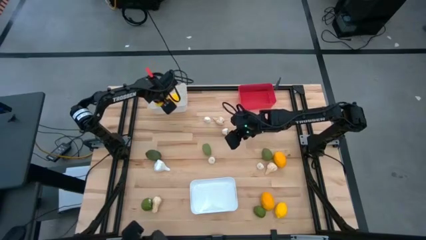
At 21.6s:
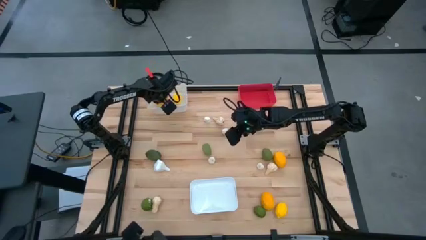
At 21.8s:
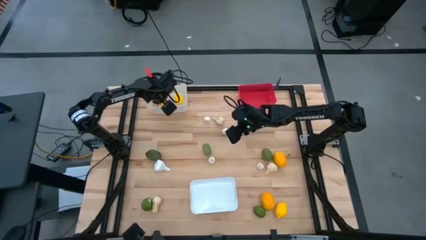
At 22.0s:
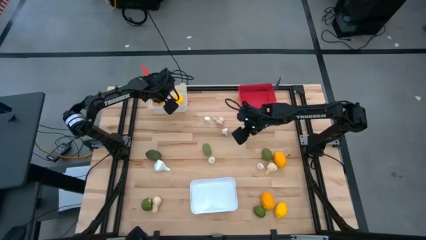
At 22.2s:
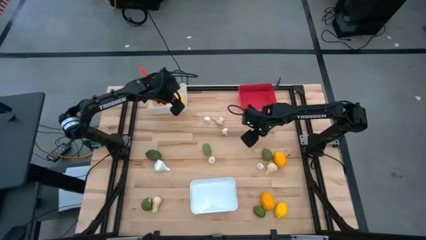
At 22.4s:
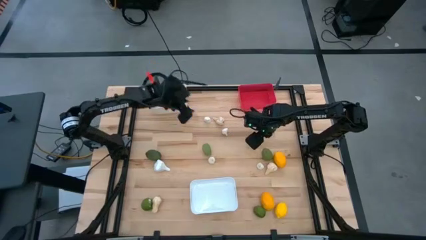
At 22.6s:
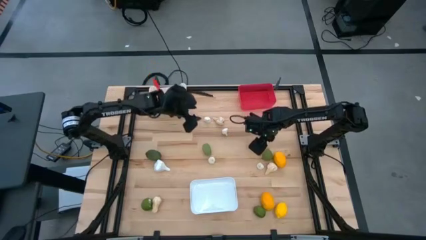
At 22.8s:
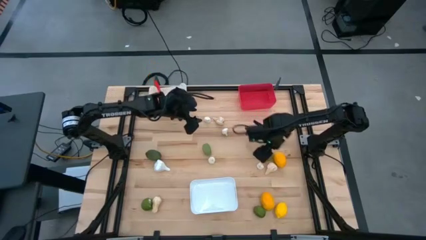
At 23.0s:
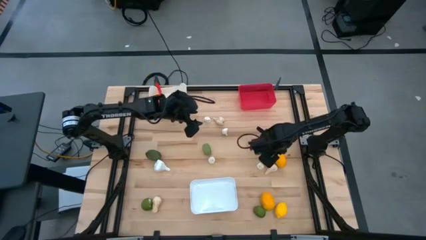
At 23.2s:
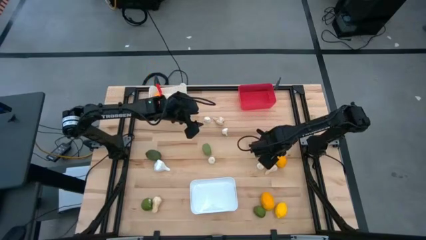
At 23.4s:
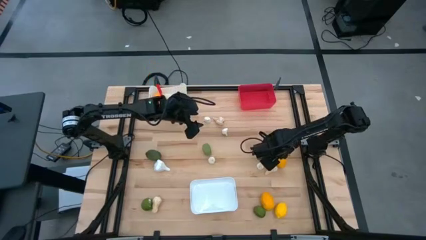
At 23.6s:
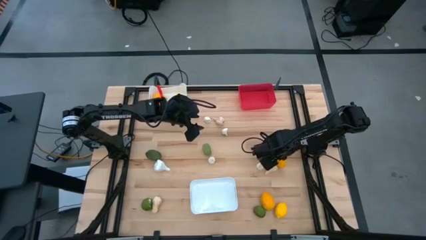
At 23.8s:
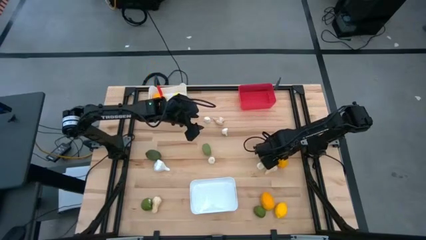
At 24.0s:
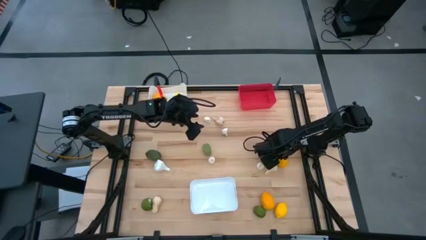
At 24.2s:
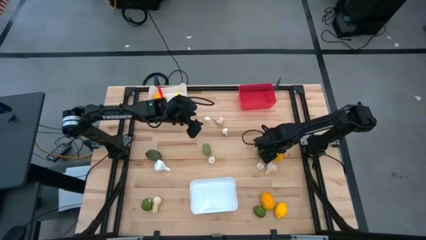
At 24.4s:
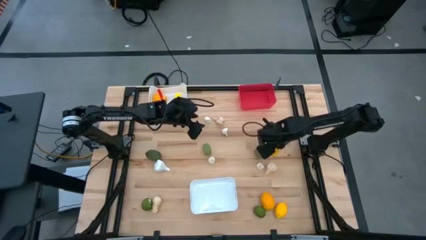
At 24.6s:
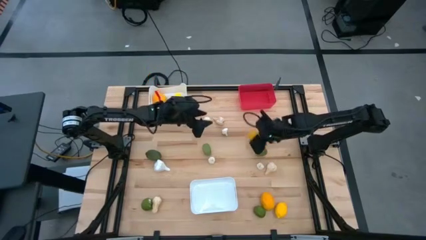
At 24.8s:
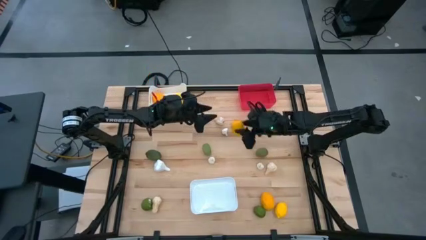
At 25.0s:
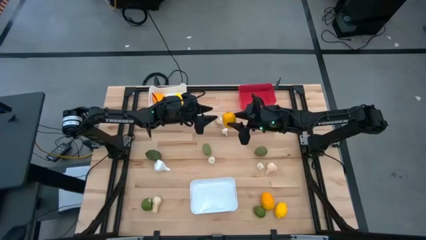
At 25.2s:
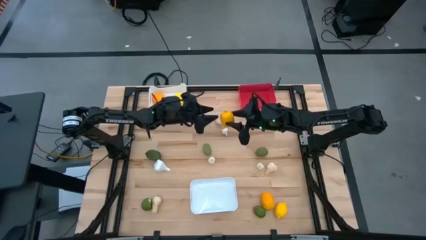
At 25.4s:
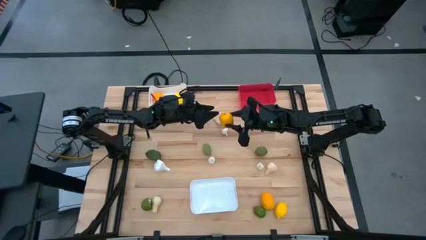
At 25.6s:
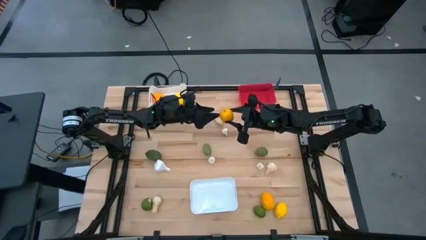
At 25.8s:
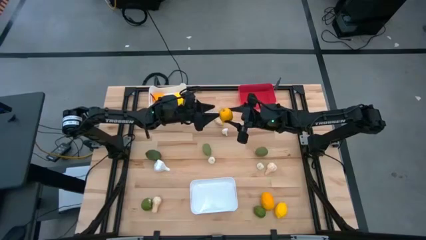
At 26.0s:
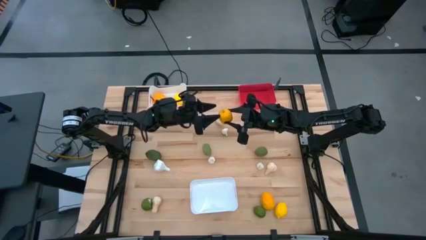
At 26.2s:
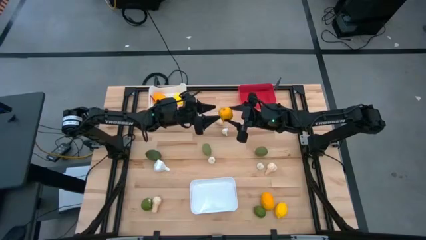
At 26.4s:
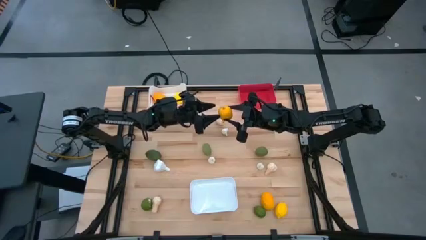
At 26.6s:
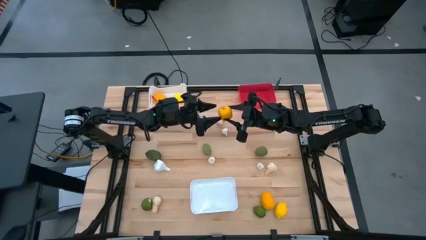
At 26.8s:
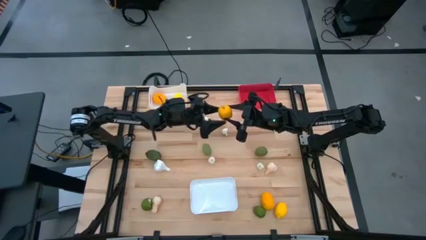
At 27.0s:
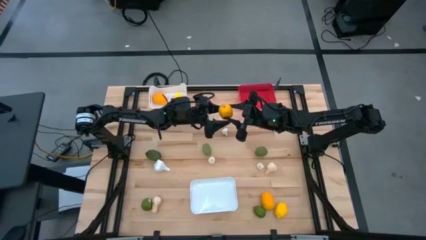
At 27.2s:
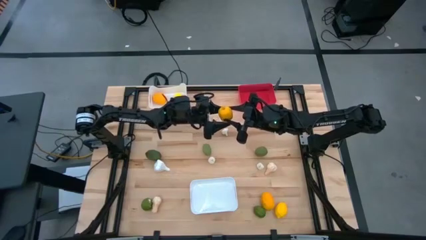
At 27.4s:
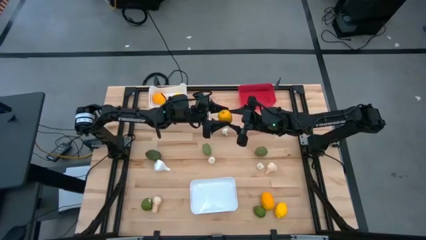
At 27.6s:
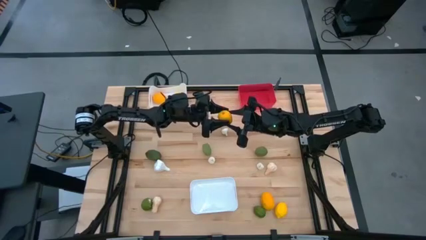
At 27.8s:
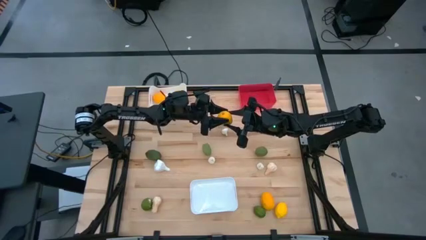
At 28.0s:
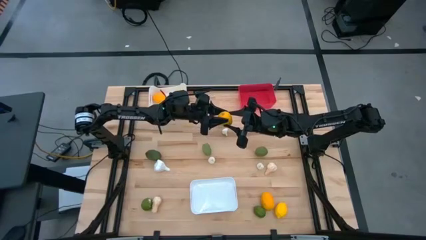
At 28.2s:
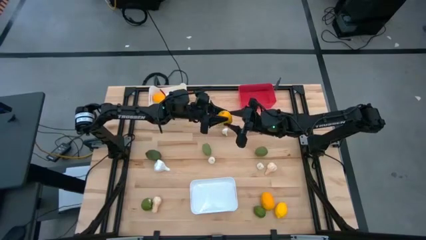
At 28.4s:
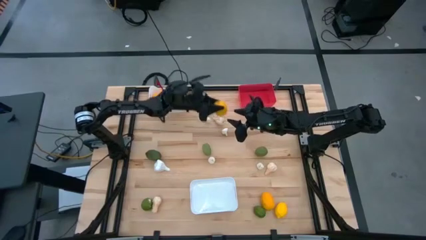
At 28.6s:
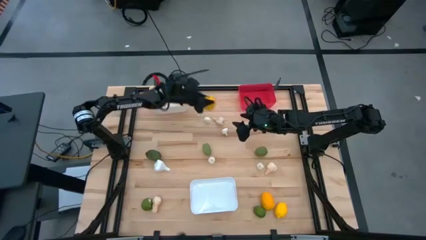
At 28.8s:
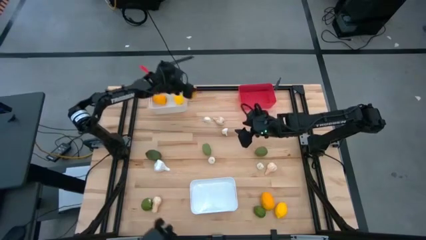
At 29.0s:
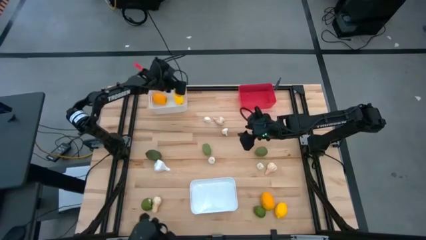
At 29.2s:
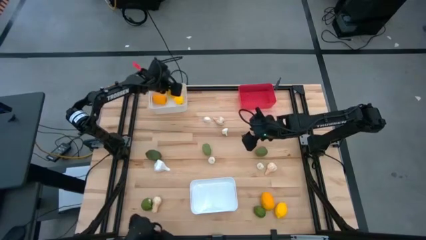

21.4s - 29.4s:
Task: Sort produce into baskets
Put the yellow lemon into the top white bin

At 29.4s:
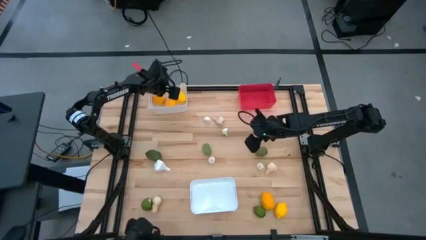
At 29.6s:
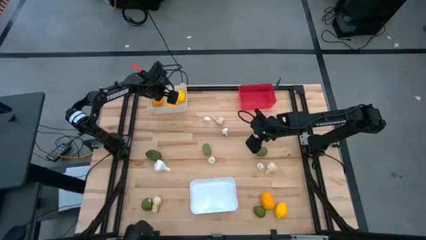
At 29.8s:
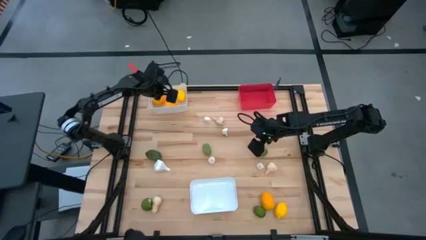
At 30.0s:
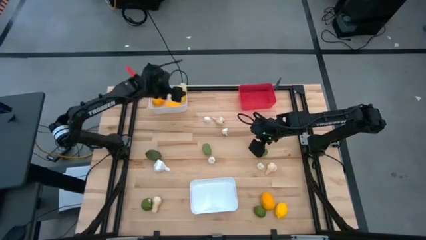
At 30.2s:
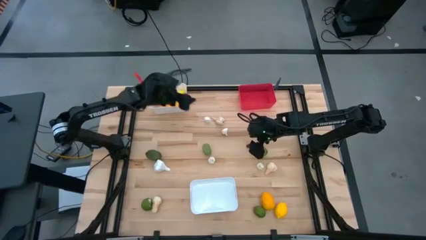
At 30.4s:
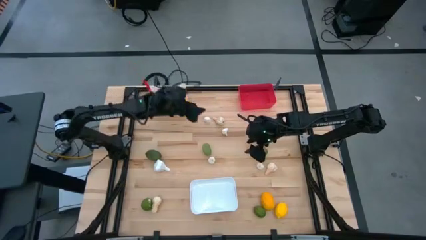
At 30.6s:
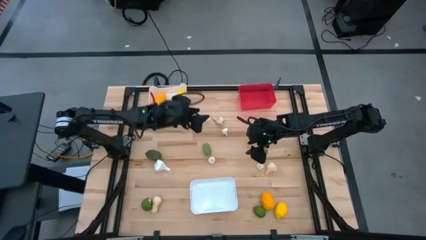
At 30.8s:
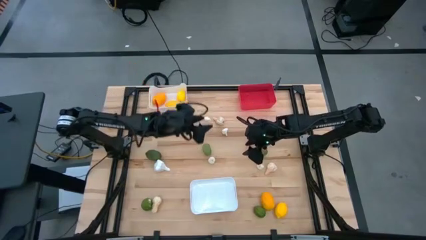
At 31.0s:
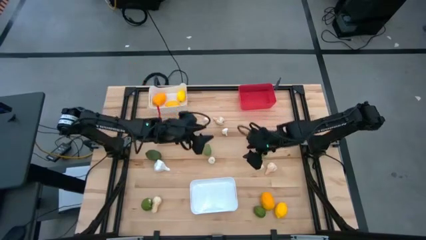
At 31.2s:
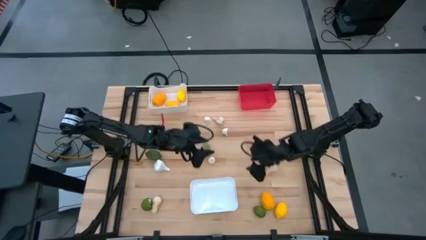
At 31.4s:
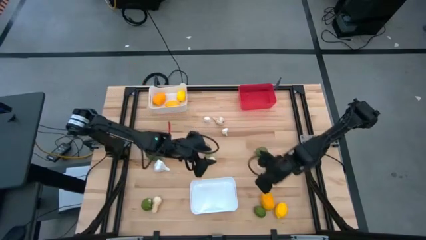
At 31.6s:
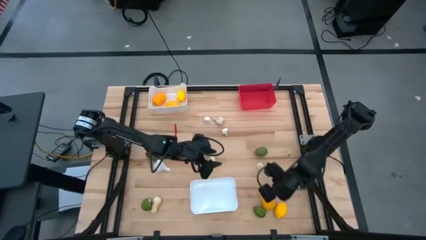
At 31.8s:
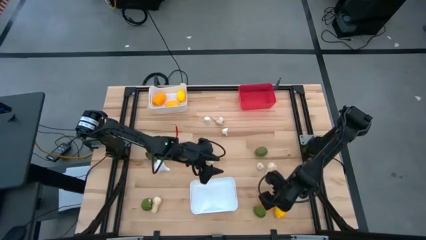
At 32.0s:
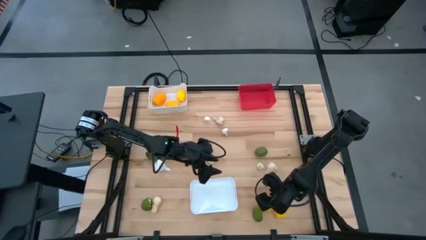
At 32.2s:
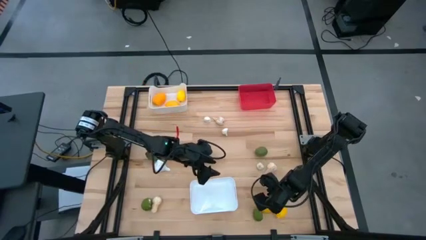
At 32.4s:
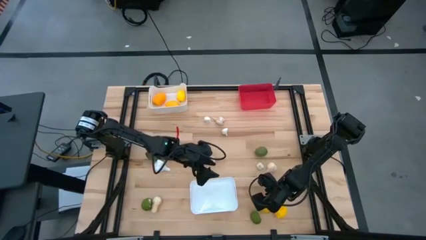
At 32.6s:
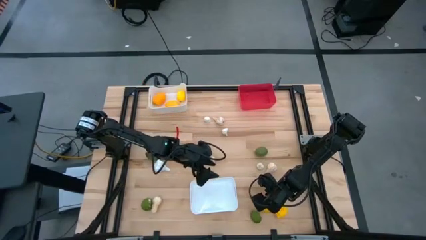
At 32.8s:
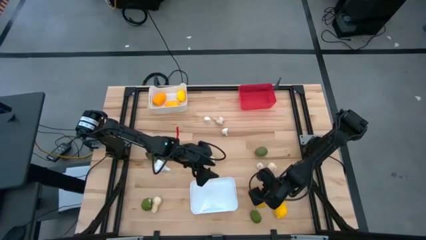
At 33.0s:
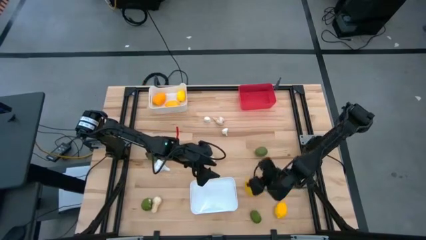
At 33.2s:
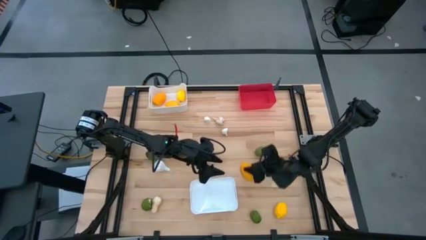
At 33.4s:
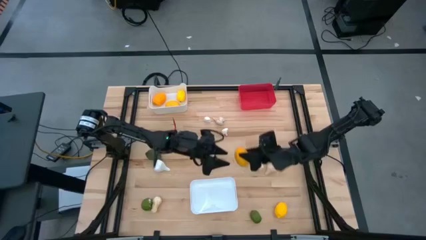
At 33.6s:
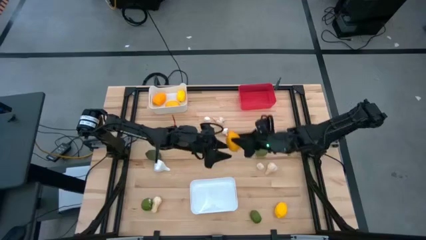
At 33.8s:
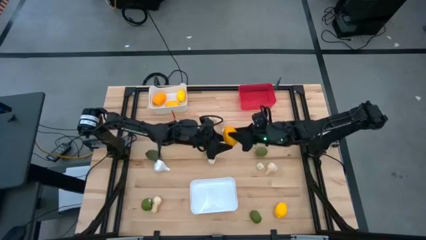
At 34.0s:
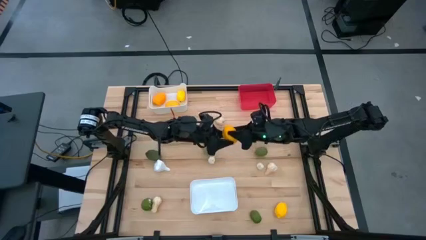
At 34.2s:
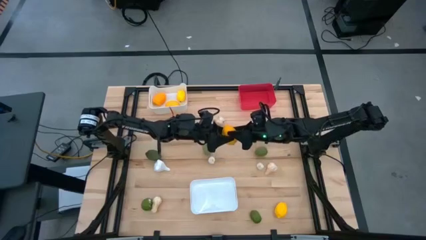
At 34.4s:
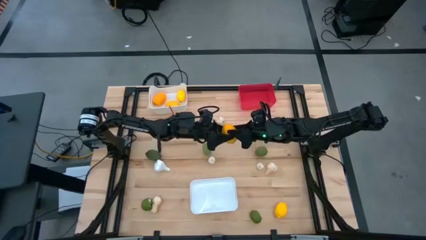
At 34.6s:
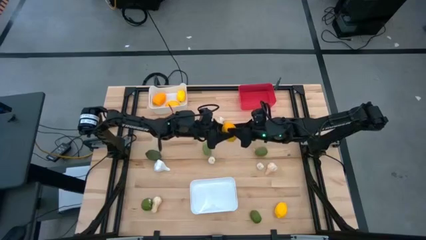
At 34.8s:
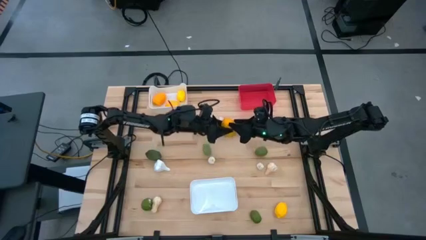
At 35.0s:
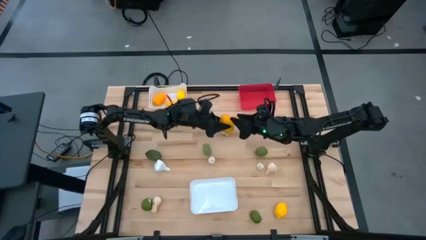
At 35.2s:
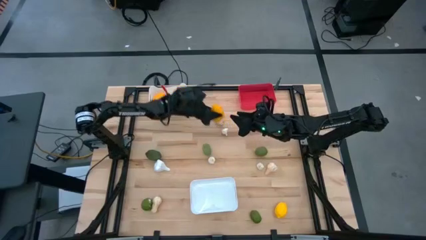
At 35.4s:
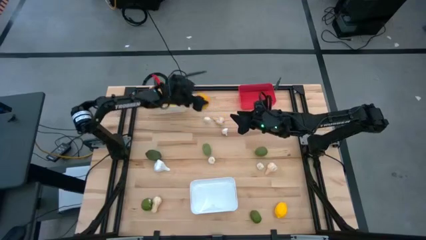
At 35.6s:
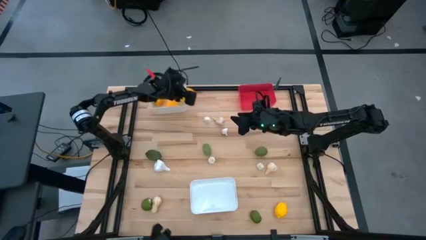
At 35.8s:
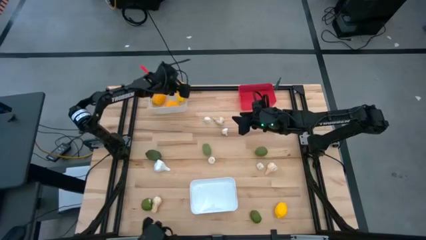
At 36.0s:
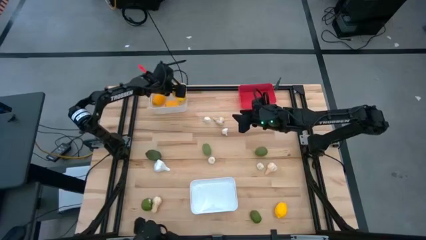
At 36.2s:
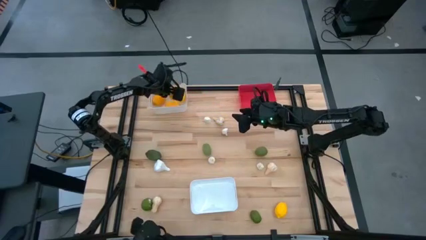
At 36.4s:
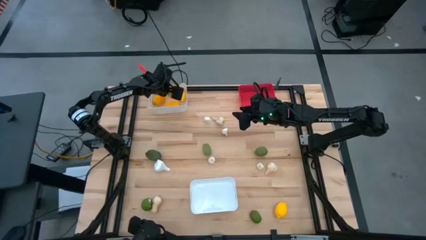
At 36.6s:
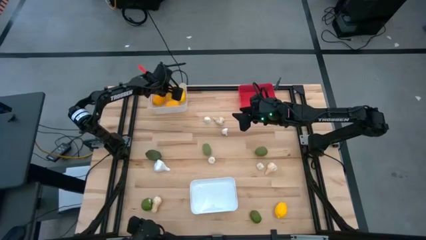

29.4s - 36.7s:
Put the yellow lemon into the top white bin

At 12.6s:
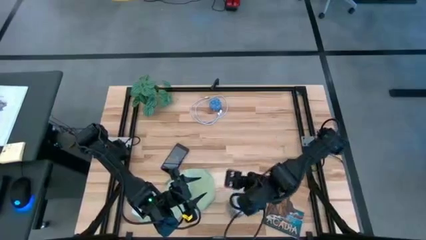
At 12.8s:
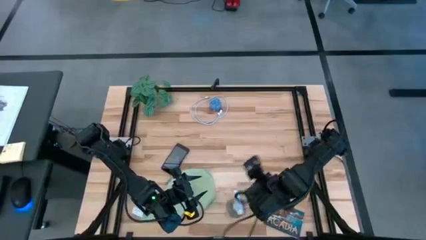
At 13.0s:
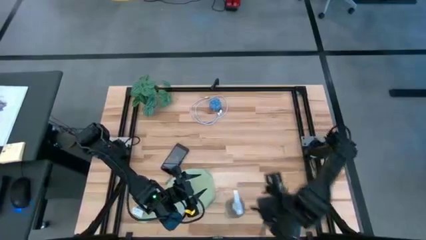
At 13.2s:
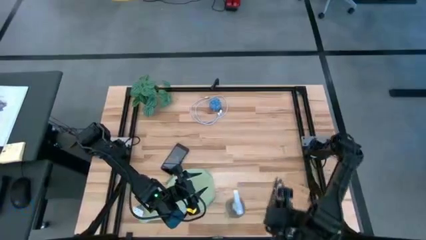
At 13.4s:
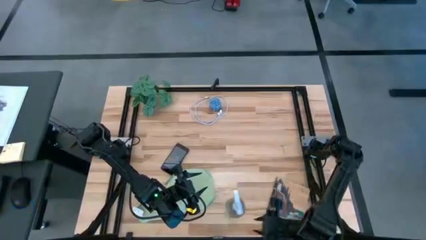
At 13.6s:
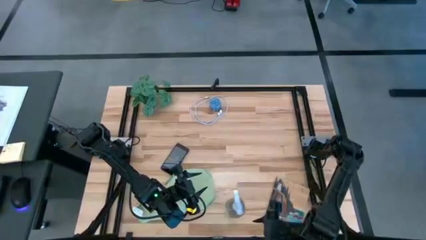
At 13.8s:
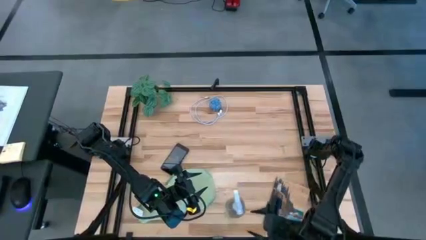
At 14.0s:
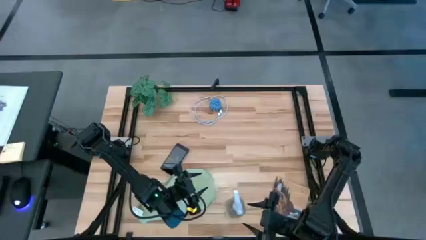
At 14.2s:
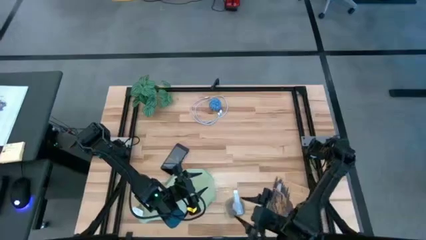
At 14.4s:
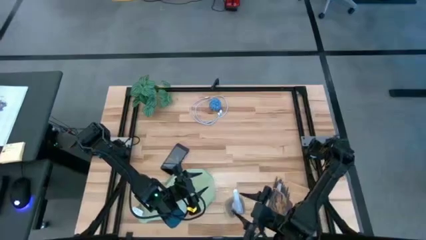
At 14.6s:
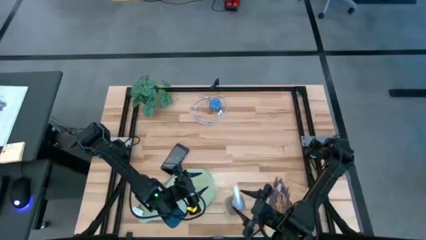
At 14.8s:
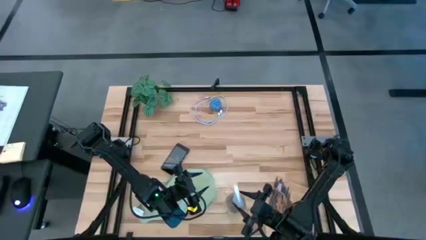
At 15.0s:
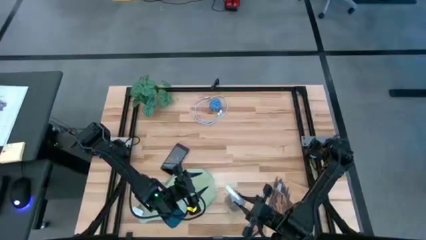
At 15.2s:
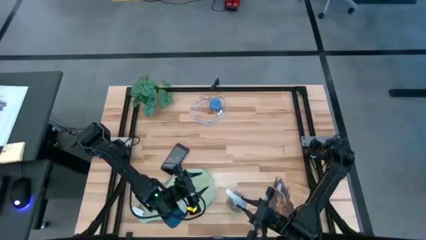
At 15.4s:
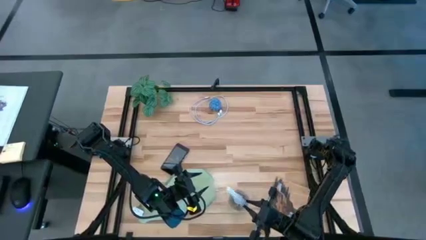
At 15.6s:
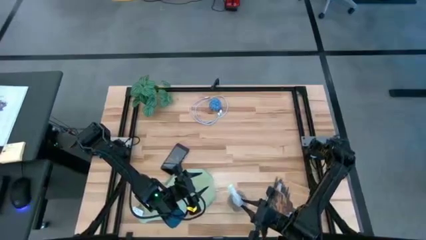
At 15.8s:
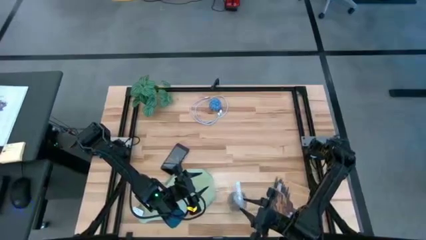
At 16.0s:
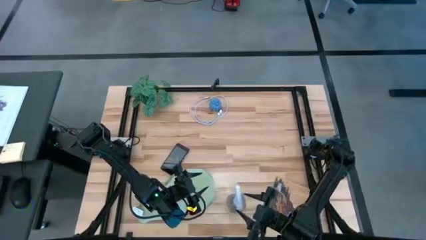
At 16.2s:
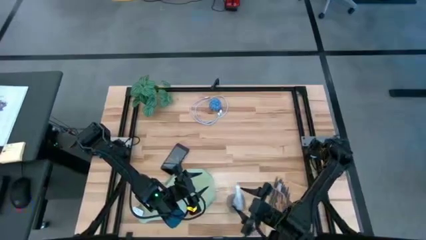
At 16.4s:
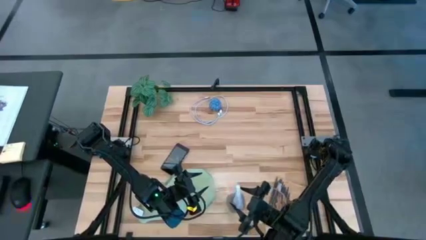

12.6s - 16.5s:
Task: Apply microfiber cloth
Spray the phone using the spray bottle
